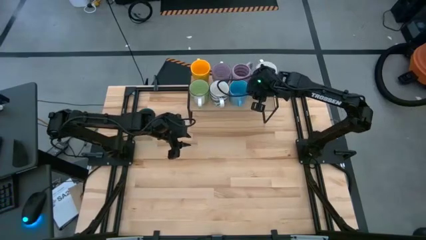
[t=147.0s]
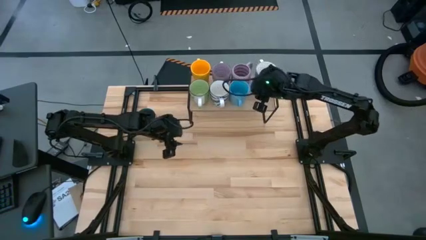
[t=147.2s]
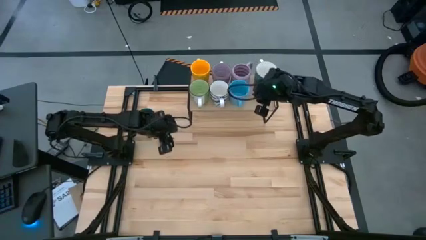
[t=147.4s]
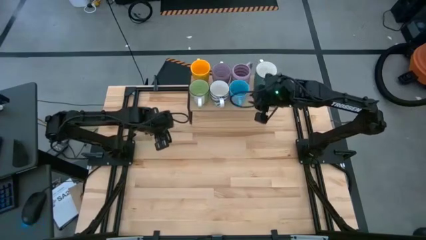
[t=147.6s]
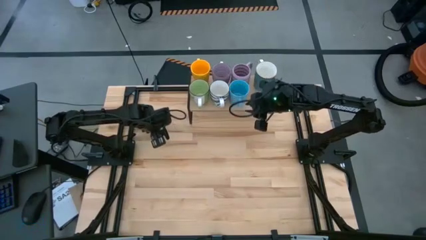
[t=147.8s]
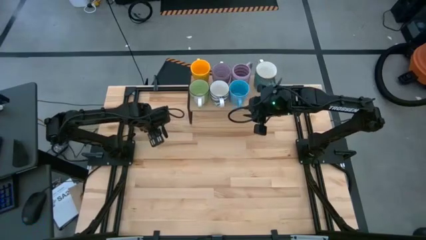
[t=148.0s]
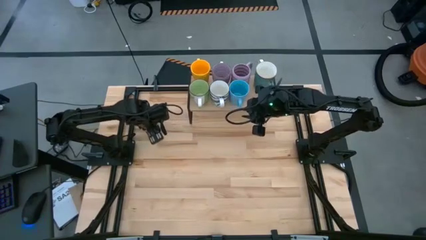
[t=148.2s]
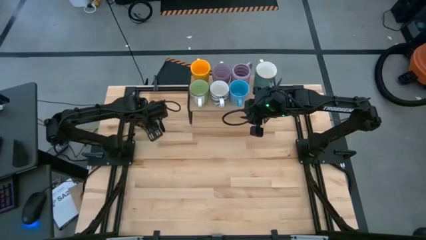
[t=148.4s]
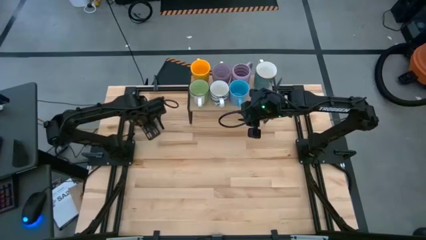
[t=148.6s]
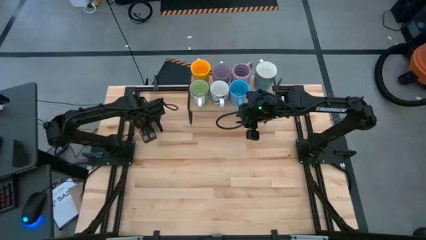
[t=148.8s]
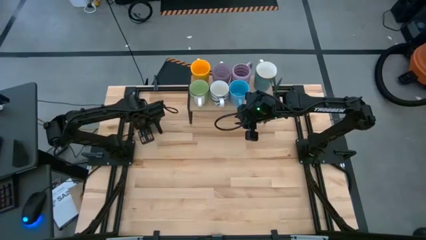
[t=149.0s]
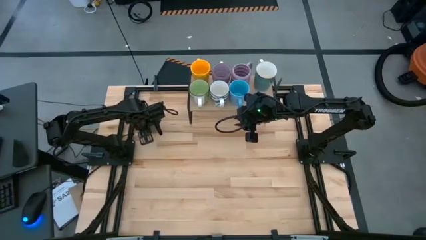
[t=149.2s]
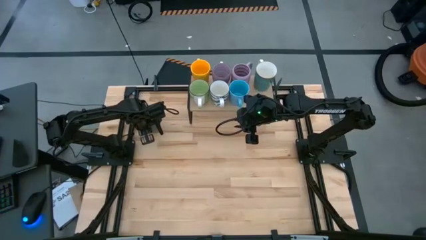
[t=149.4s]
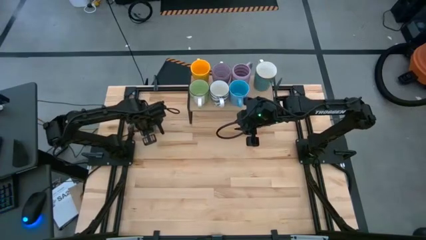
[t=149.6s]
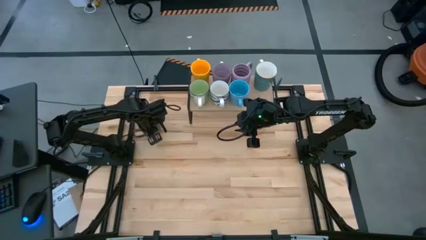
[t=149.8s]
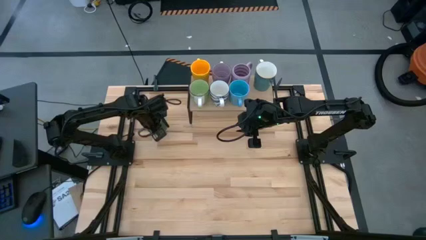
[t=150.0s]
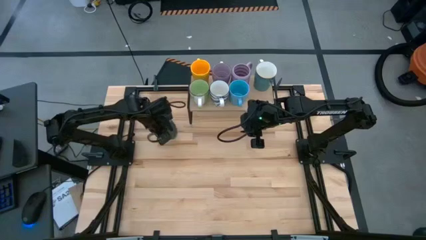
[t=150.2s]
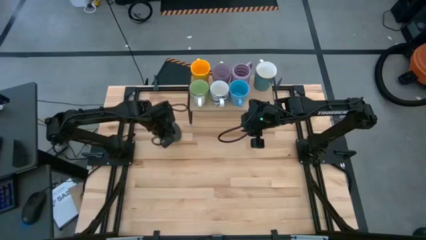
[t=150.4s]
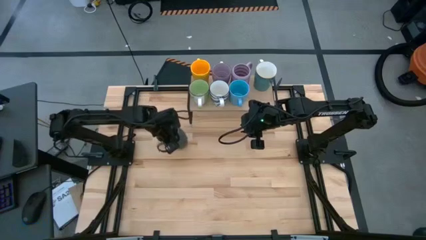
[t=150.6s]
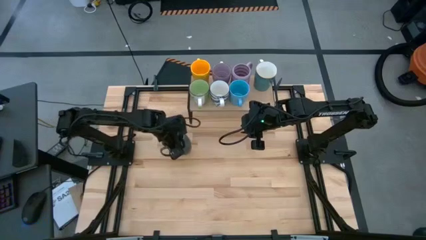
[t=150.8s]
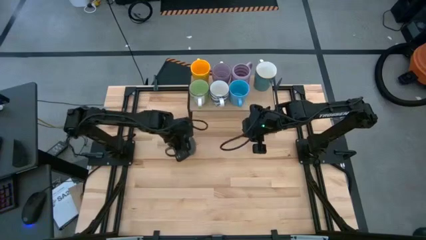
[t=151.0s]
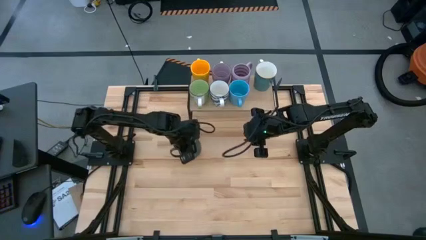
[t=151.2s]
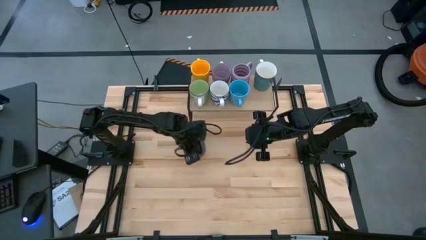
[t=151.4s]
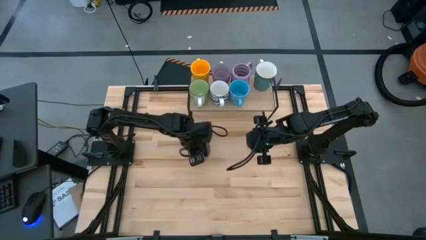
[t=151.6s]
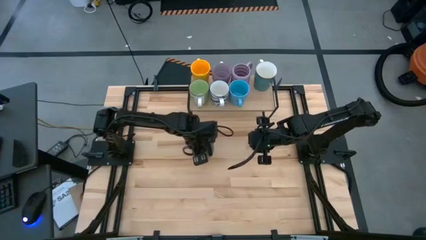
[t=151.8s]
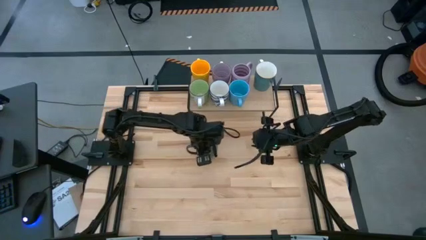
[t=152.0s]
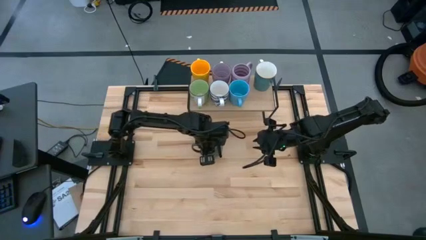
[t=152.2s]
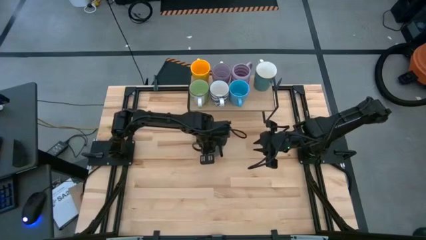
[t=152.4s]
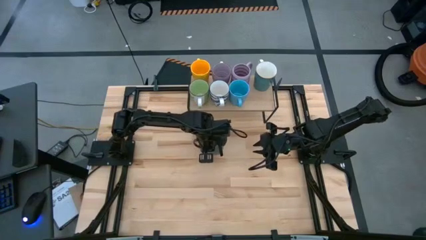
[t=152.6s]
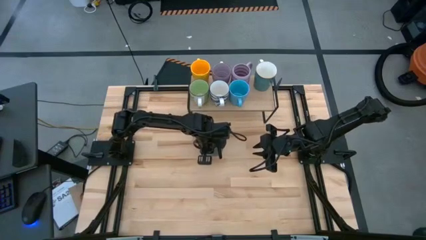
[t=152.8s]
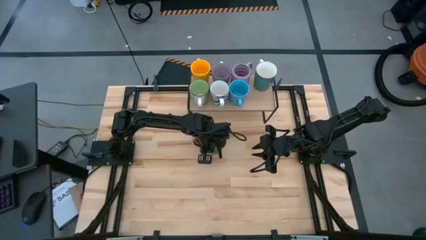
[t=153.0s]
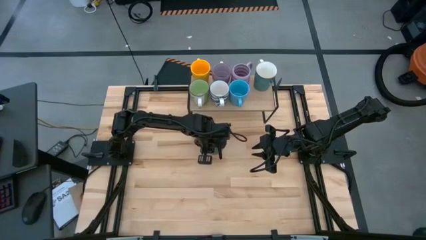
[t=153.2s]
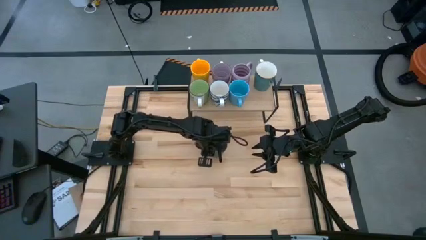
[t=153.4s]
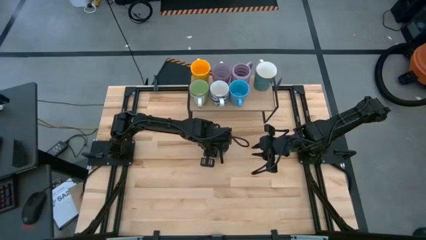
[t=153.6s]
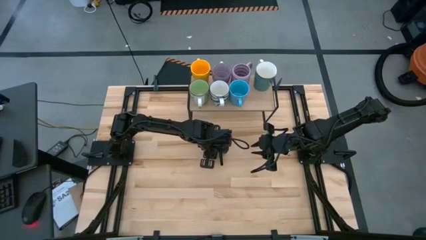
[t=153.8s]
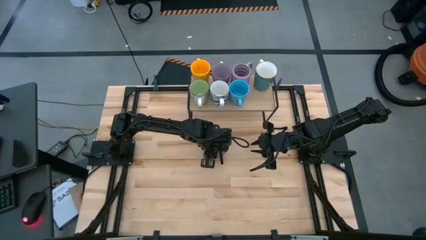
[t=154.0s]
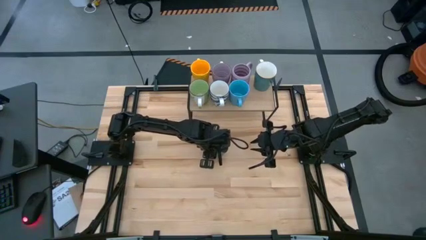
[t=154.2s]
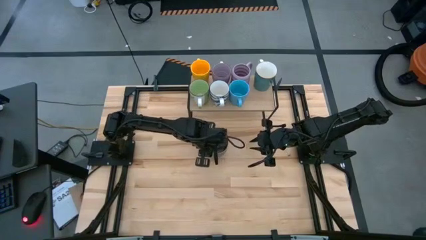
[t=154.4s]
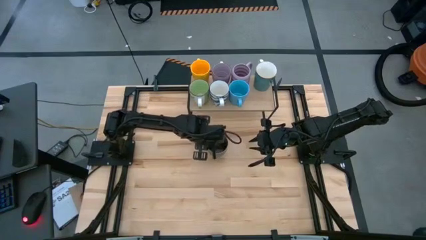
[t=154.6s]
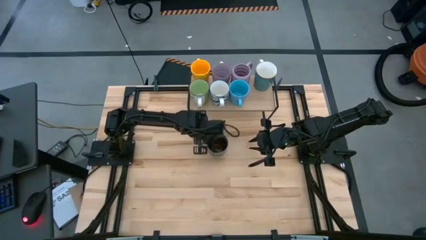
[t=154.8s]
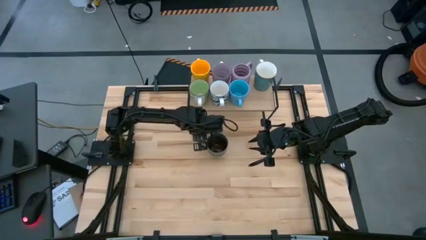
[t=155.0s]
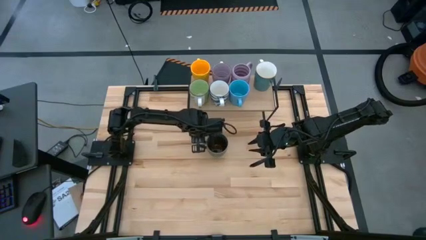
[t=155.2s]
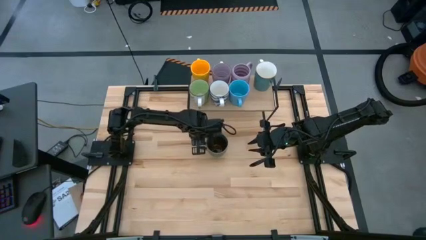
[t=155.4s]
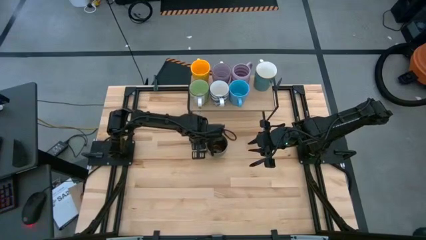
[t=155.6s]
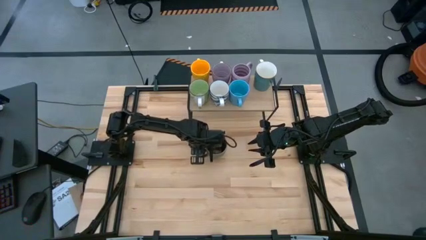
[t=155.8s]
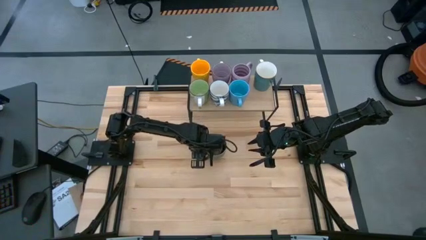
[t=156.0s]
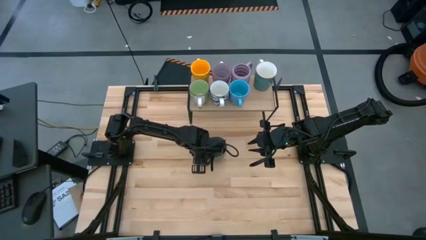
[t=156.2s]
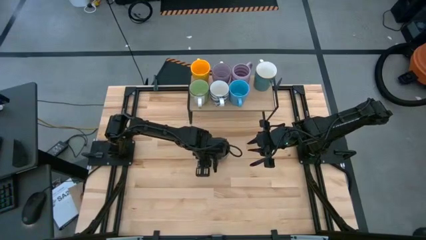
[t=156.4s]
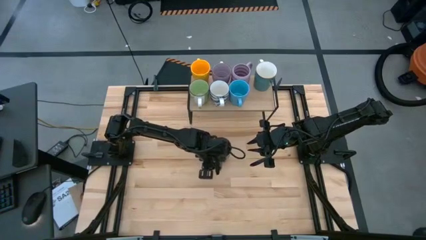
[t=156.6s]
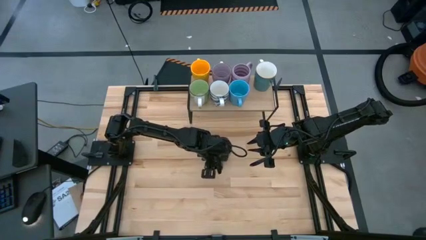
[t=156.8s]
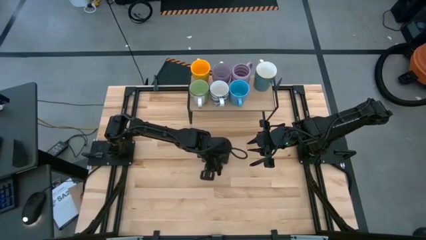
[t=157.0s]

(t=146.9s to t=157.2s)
Task: Place coffee mugs
Put the brown mug on the shelf
